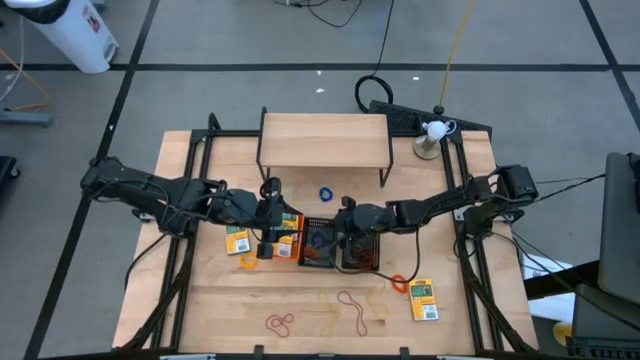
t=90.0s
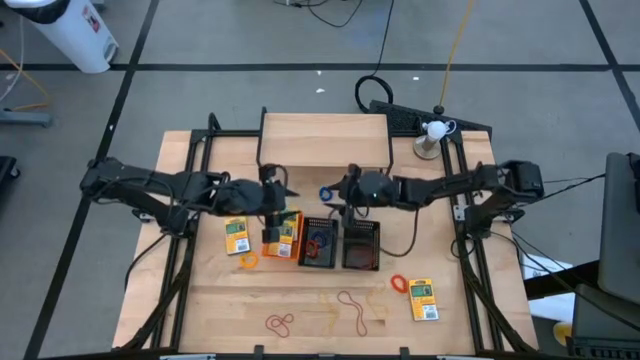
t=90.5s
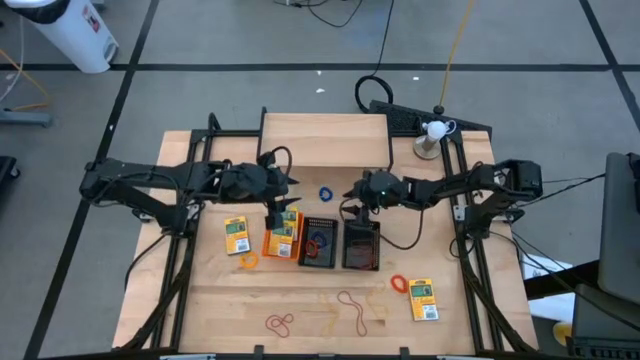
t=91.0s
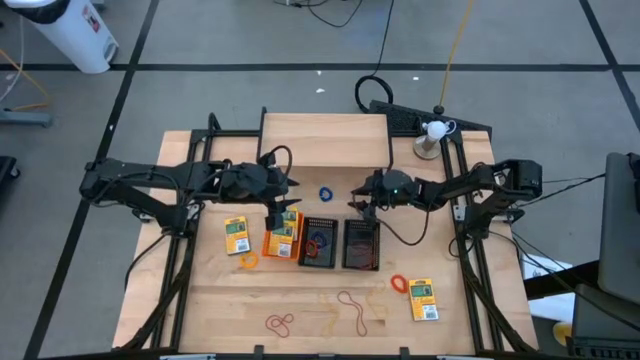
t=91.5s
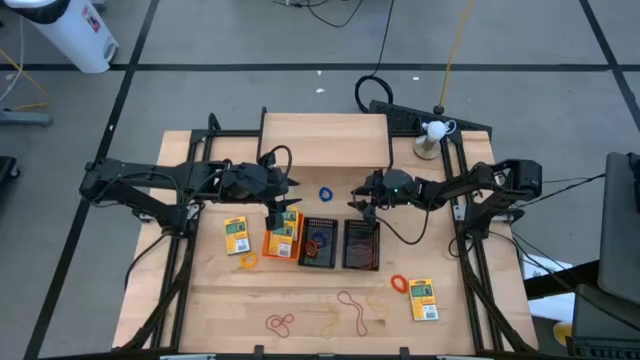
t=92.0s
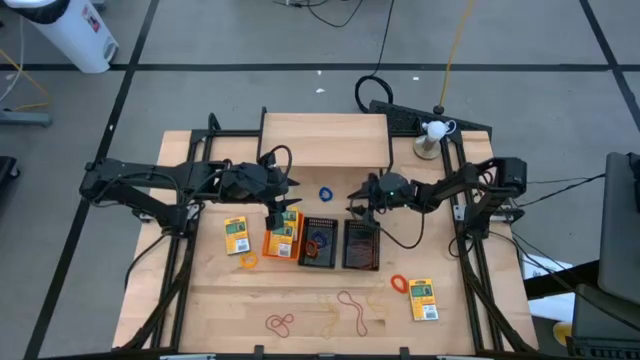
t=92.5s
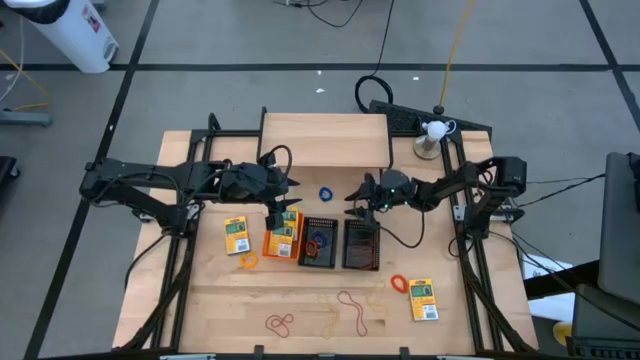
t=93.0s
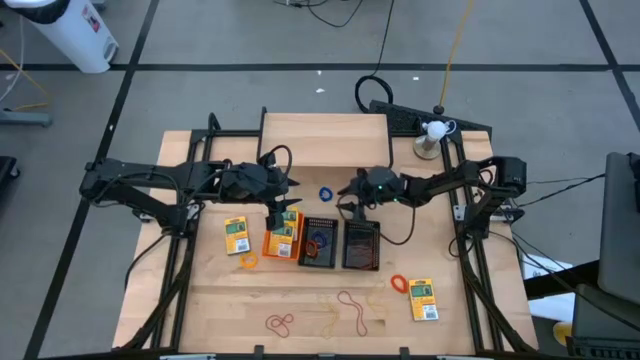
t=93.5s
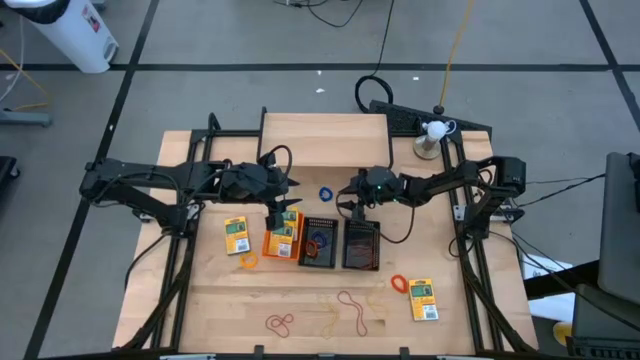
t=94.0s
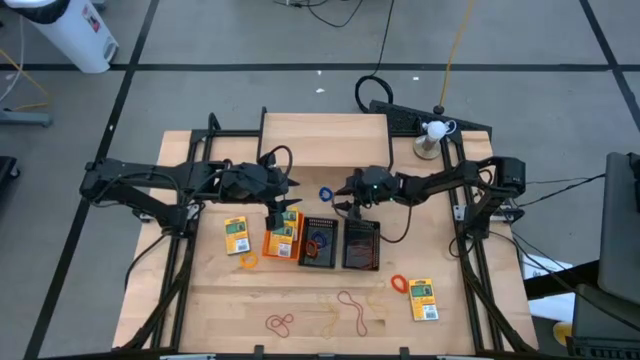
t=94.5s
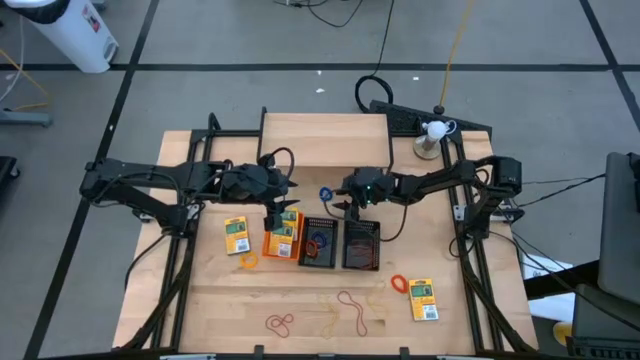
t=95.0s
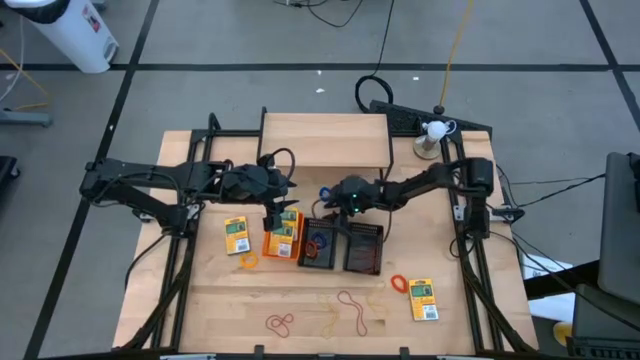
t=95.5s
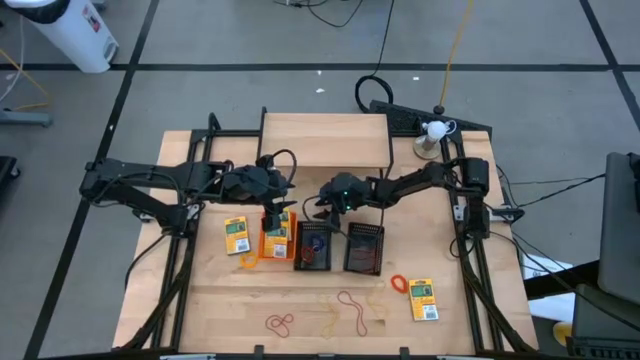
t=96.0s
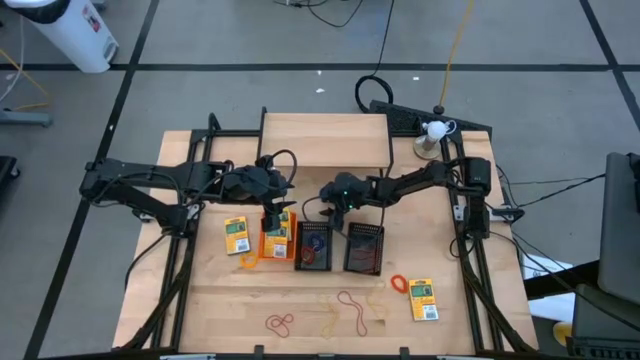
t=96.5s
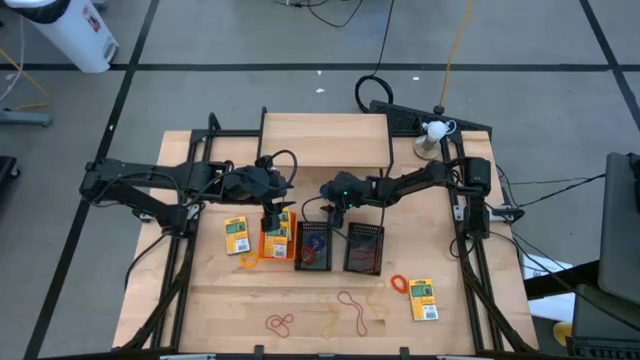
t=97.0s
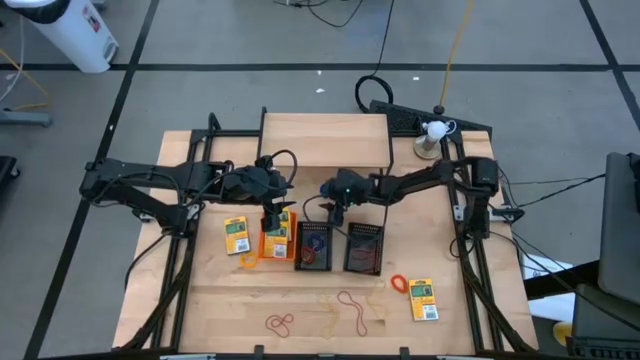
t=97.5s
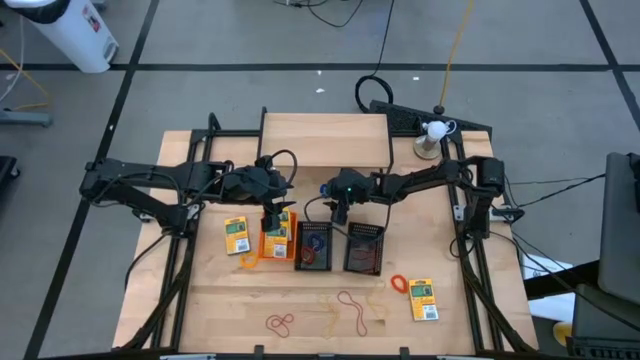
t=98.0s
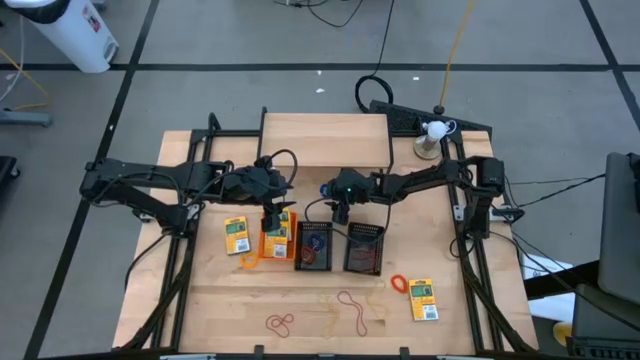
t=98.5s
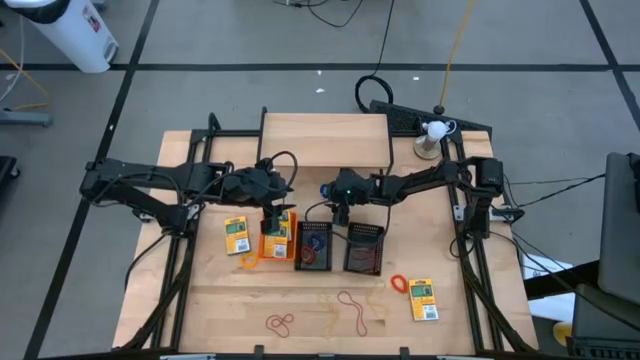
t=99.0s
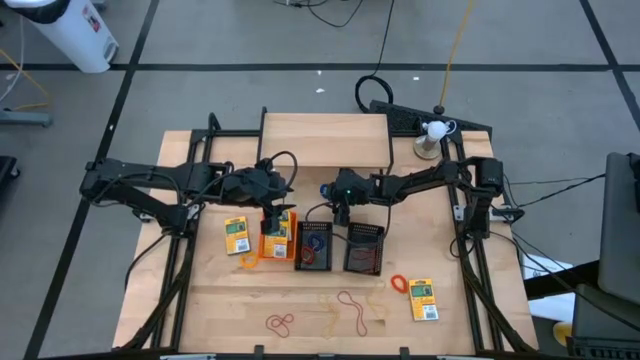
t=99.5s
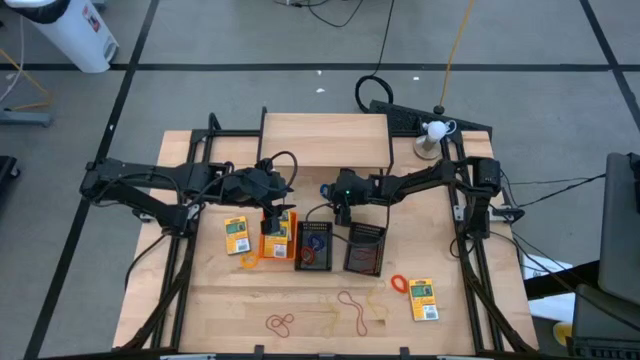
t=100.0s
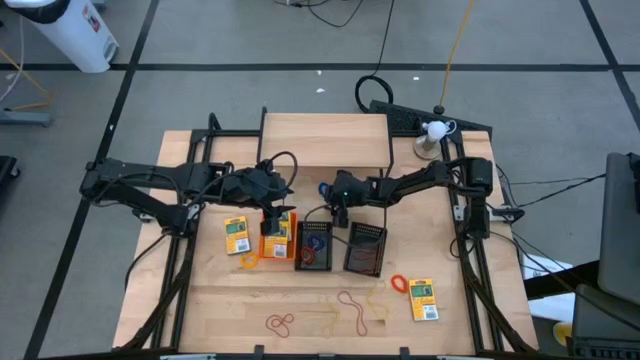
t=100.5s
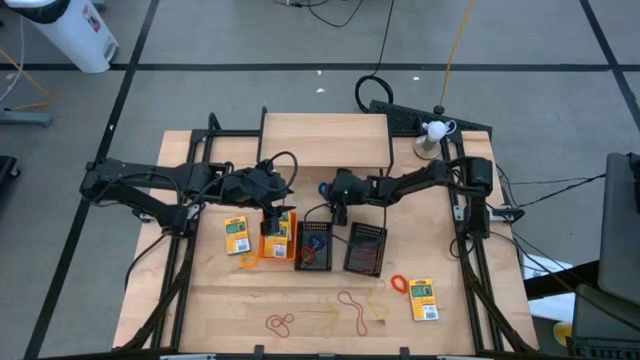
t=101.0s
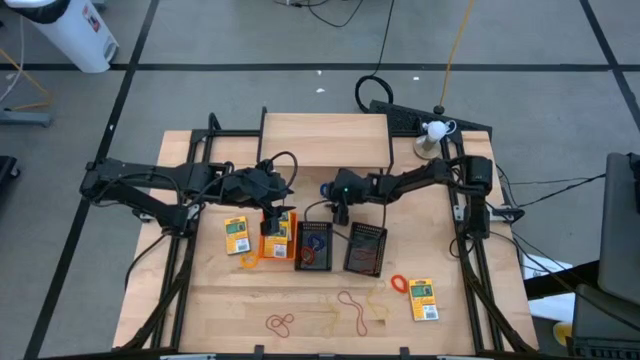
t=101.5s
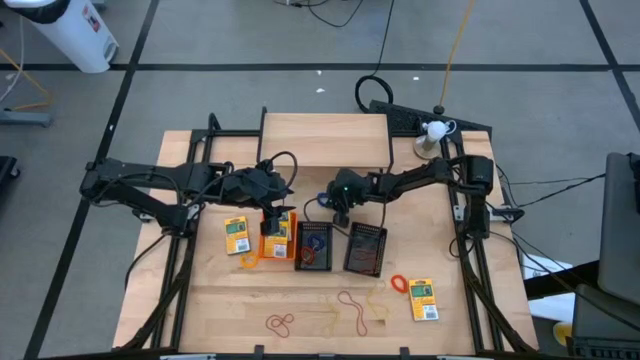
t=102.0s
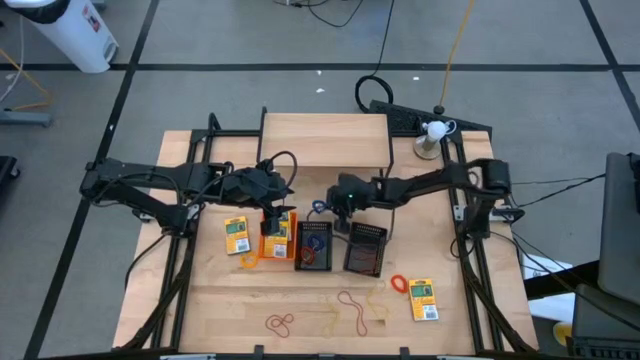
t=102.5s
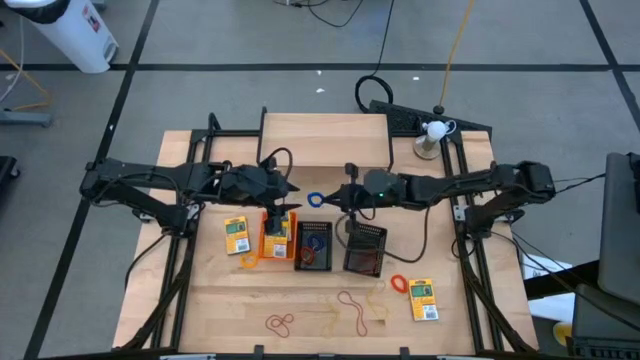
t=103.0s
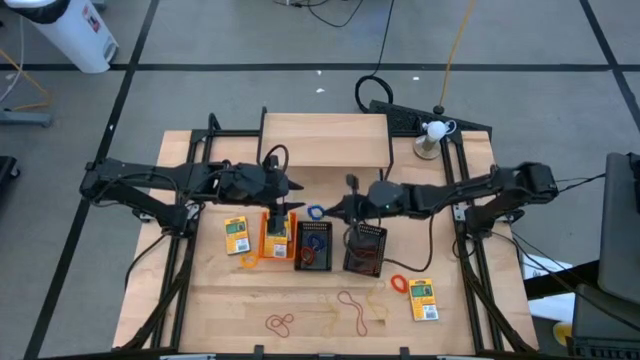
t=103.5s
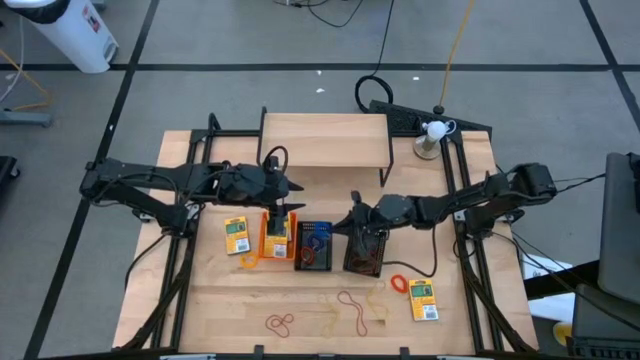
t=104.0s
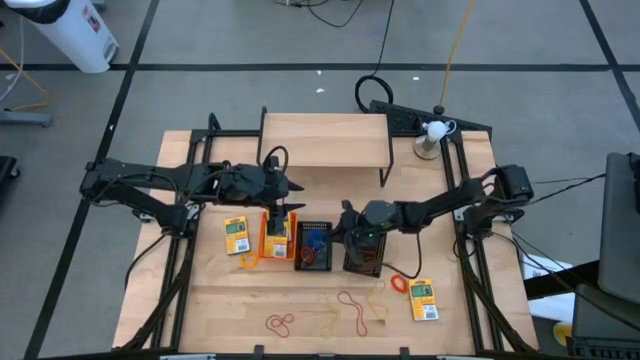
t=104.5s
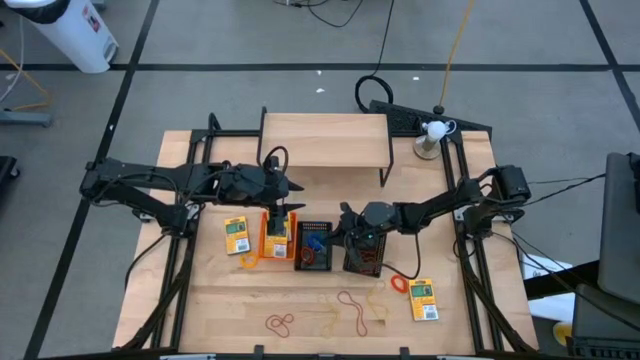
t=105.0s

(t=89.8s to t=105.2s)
Task: Pick & Place Office Desk Supplies
Put the blue spring rubber band into the left black bin

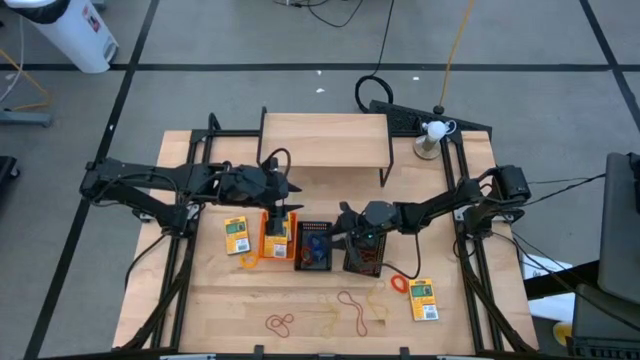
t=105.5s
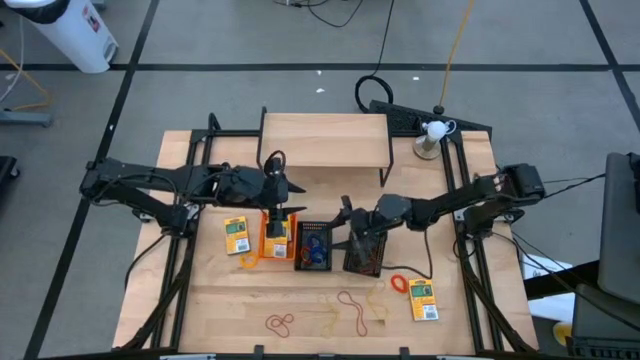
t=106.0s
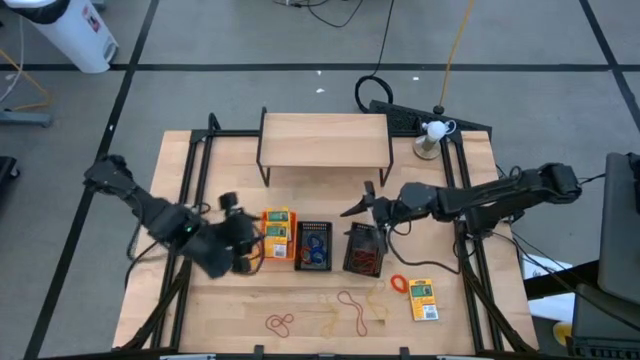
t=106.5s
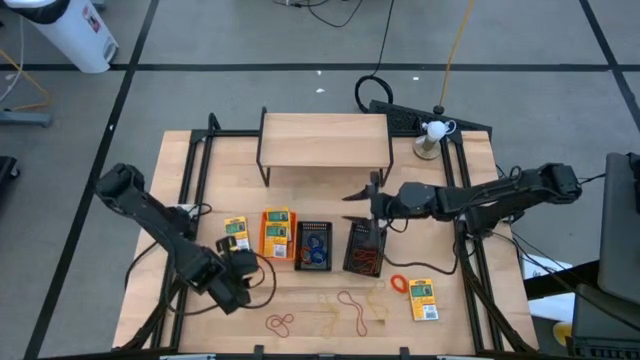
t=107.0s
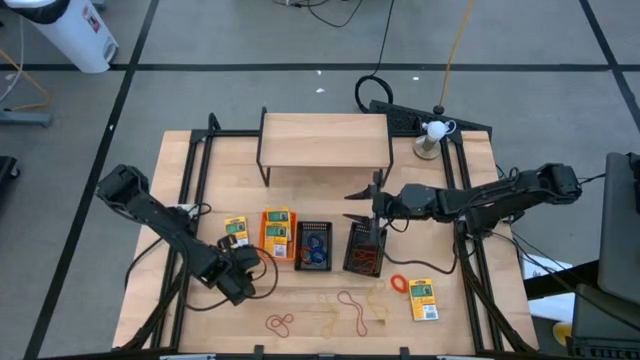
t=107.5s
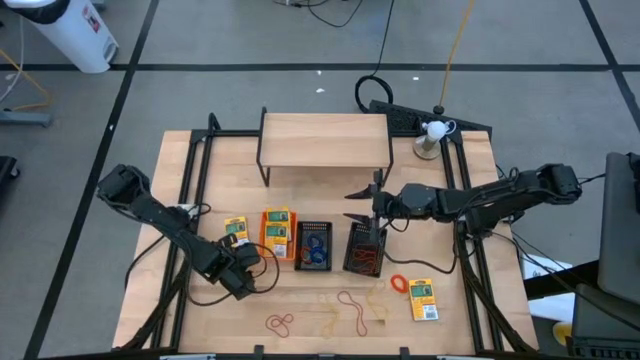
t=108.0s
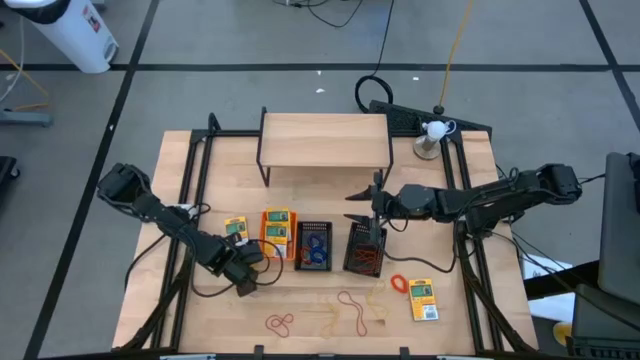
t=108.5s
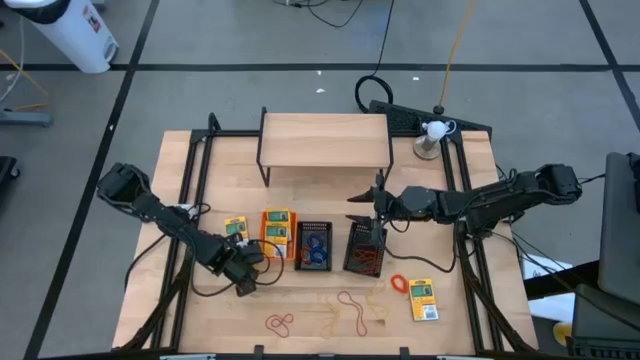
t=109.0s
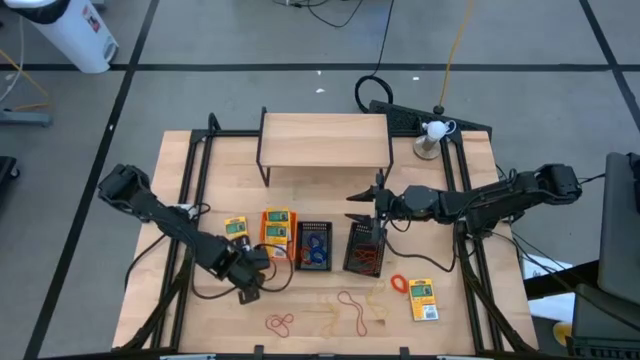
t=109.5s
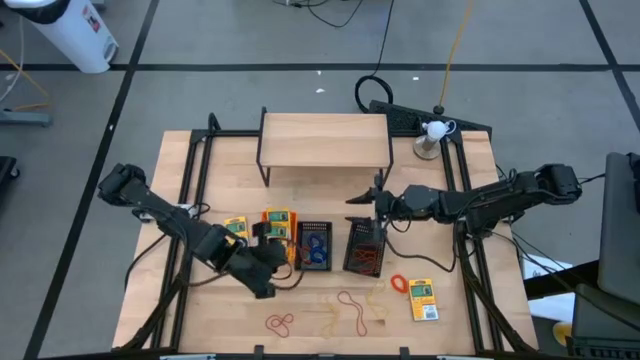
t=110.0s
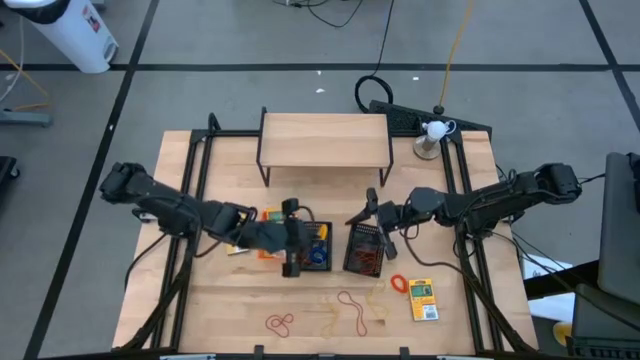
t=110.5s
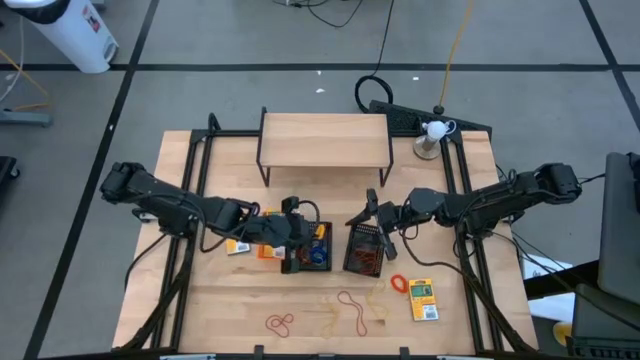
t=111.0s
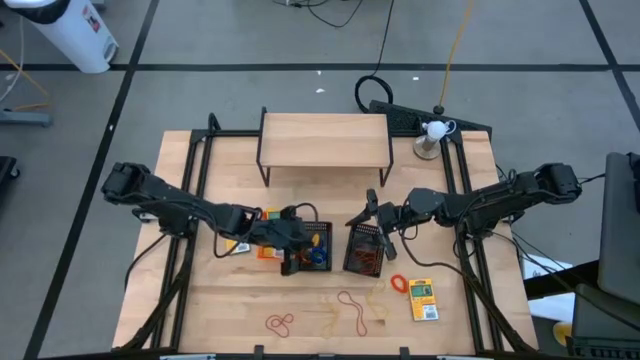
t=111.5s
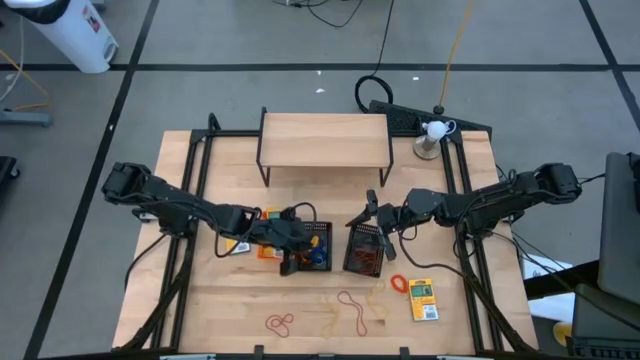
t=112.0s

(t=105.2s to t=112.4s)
Put the light orange spring rubber band into the left black bin
